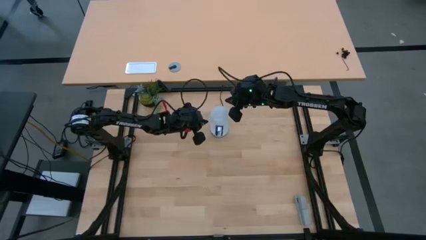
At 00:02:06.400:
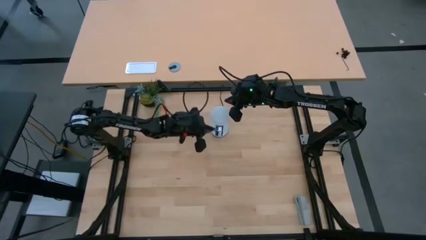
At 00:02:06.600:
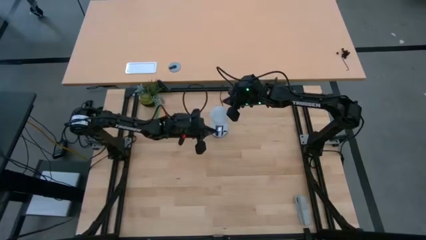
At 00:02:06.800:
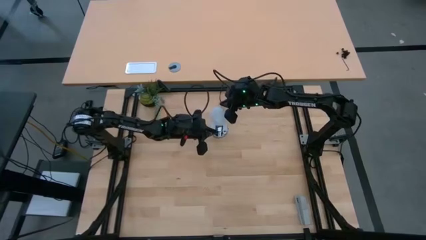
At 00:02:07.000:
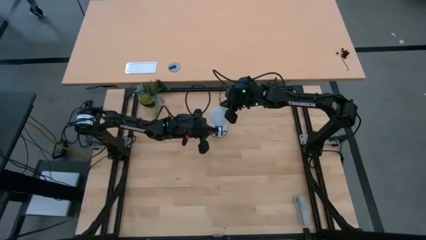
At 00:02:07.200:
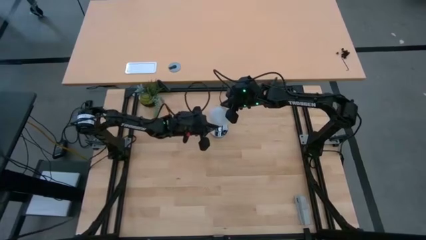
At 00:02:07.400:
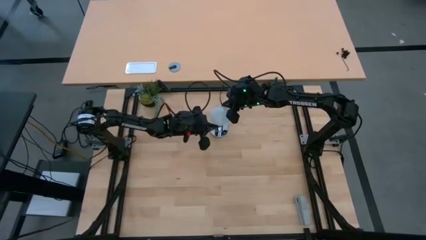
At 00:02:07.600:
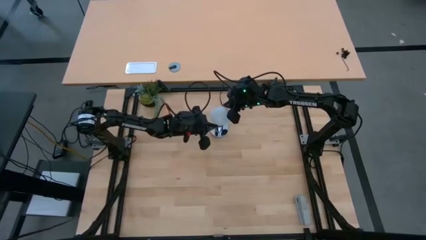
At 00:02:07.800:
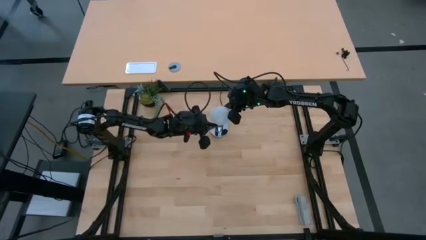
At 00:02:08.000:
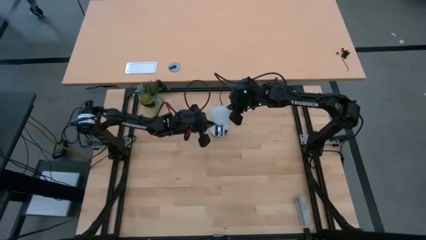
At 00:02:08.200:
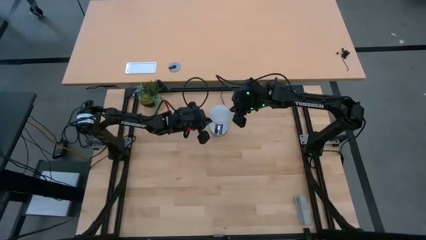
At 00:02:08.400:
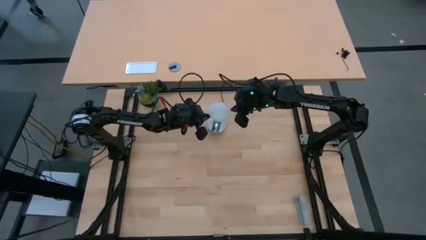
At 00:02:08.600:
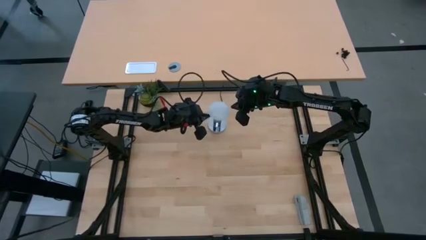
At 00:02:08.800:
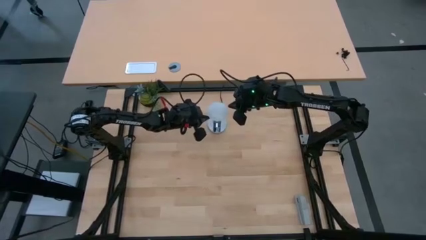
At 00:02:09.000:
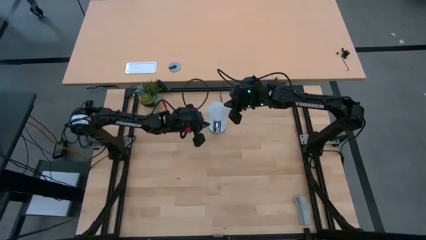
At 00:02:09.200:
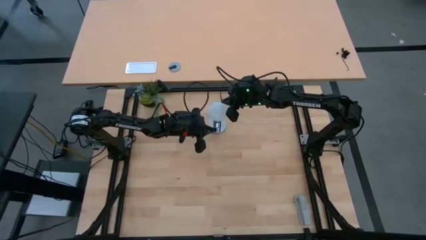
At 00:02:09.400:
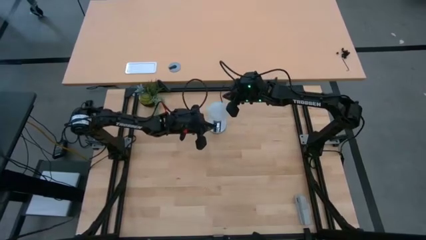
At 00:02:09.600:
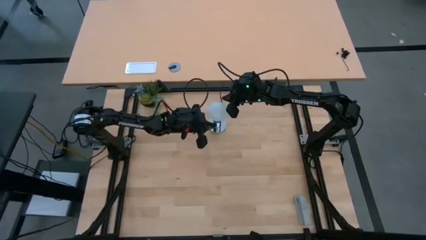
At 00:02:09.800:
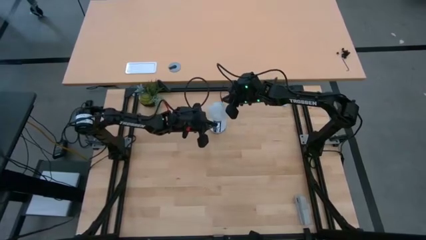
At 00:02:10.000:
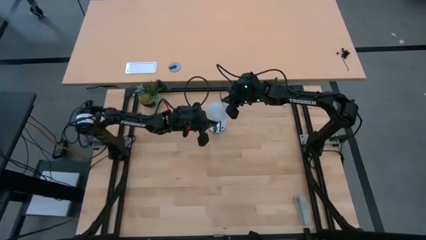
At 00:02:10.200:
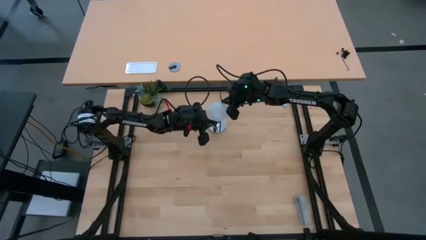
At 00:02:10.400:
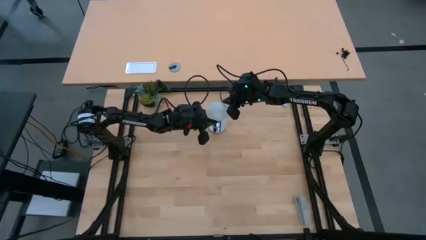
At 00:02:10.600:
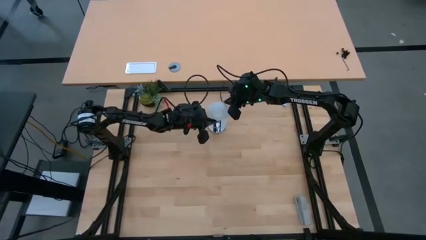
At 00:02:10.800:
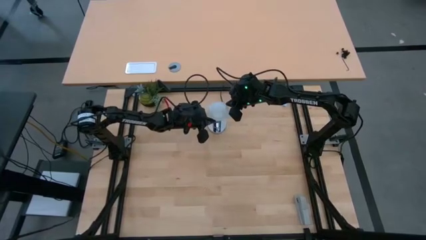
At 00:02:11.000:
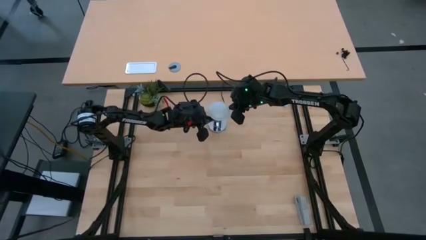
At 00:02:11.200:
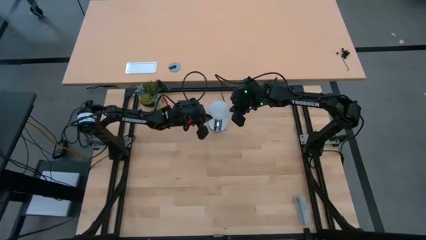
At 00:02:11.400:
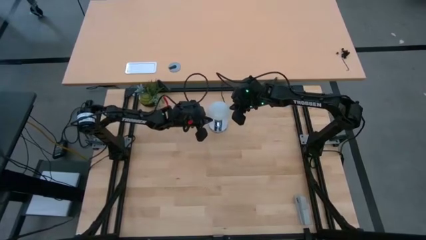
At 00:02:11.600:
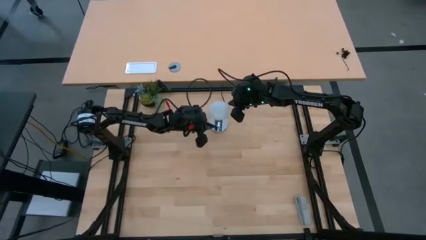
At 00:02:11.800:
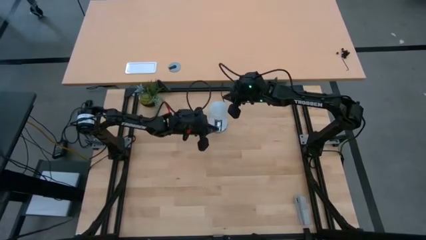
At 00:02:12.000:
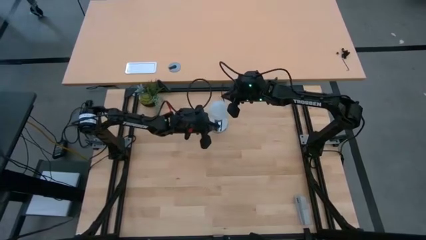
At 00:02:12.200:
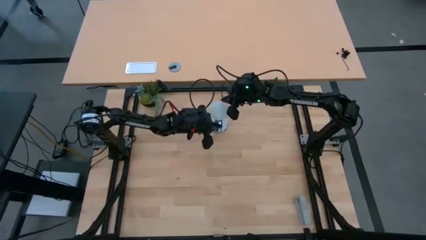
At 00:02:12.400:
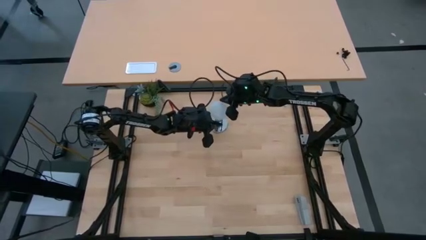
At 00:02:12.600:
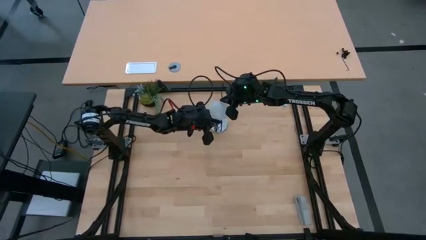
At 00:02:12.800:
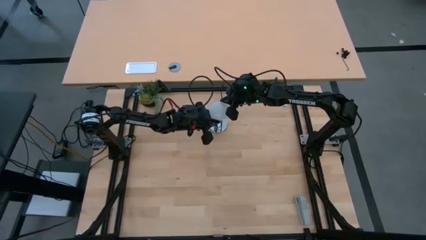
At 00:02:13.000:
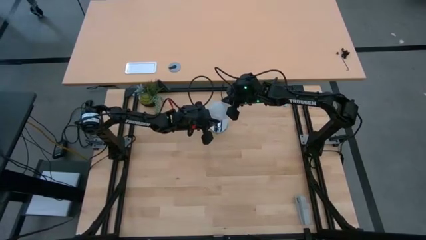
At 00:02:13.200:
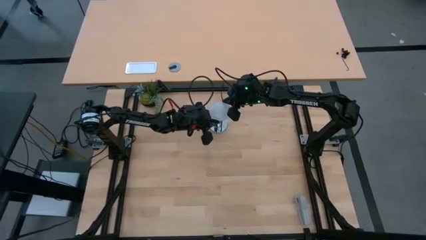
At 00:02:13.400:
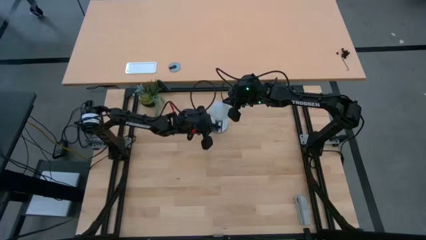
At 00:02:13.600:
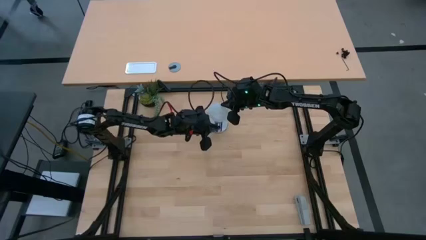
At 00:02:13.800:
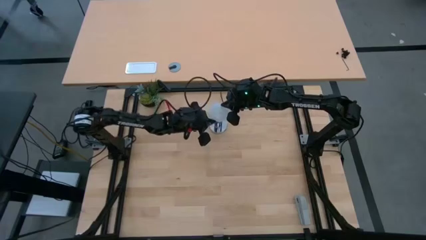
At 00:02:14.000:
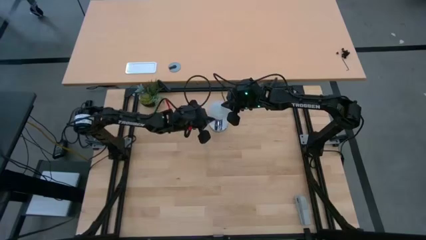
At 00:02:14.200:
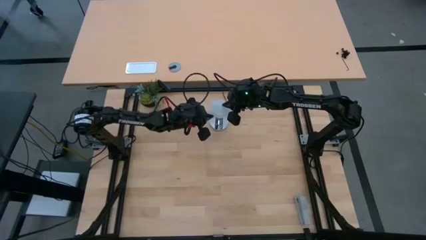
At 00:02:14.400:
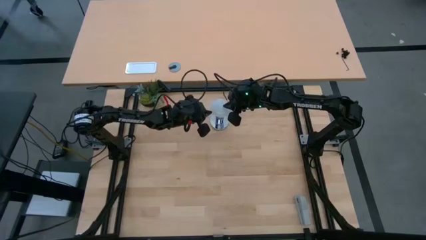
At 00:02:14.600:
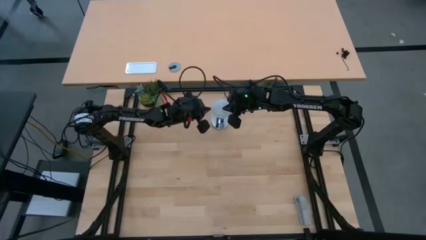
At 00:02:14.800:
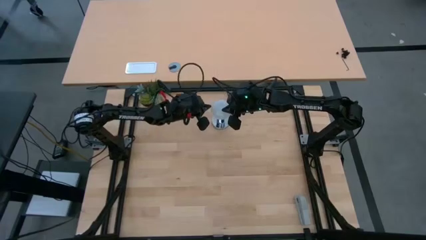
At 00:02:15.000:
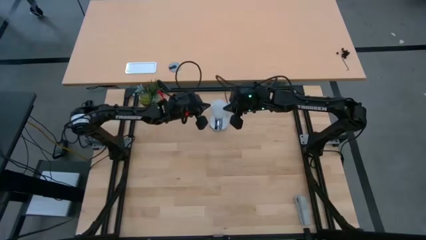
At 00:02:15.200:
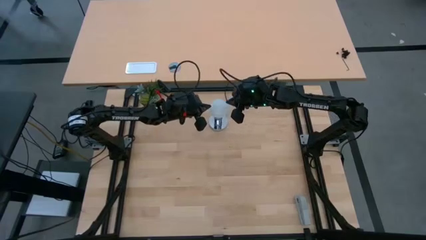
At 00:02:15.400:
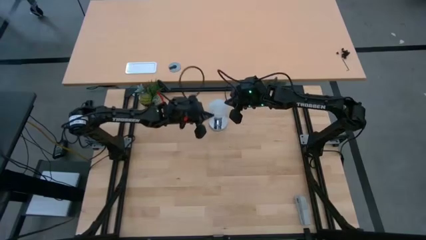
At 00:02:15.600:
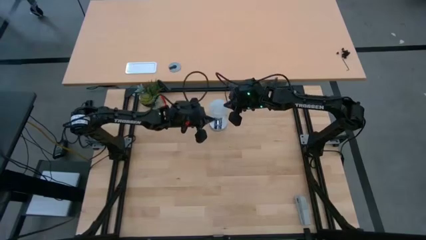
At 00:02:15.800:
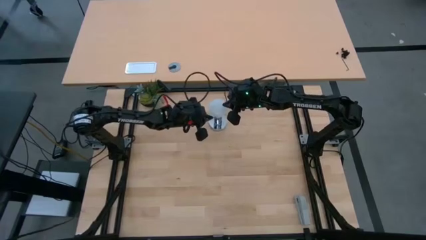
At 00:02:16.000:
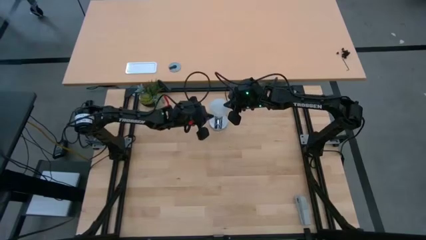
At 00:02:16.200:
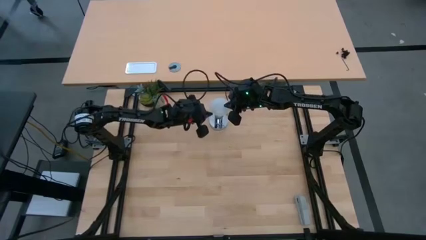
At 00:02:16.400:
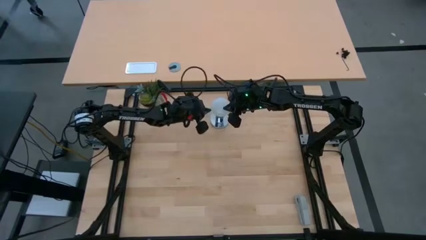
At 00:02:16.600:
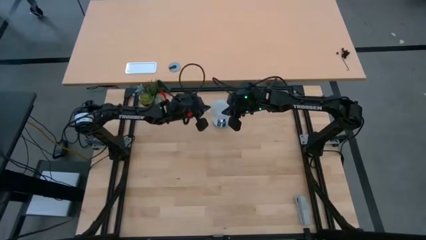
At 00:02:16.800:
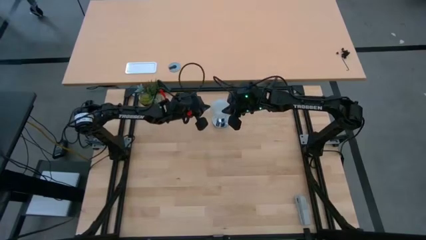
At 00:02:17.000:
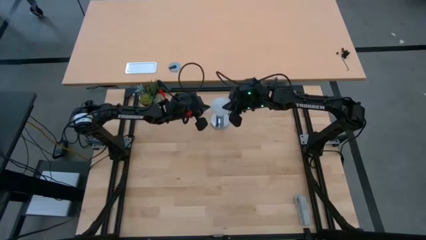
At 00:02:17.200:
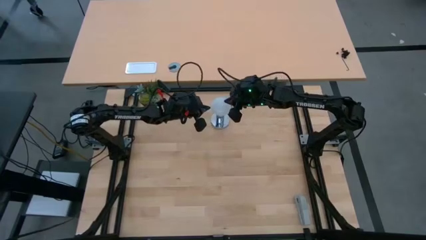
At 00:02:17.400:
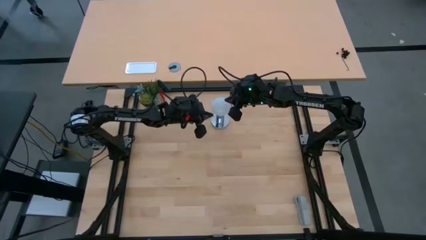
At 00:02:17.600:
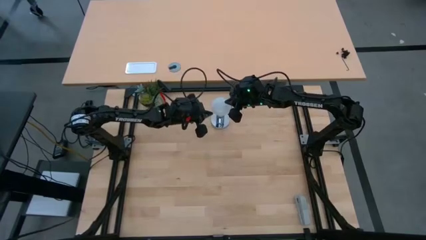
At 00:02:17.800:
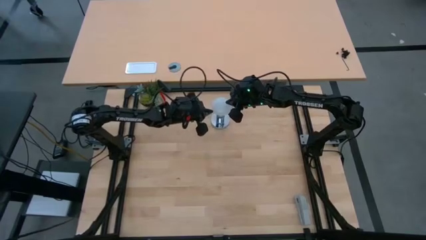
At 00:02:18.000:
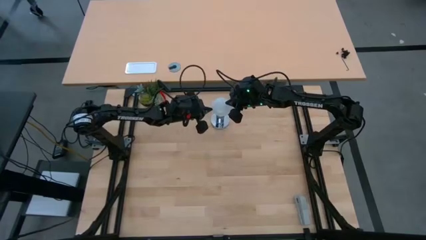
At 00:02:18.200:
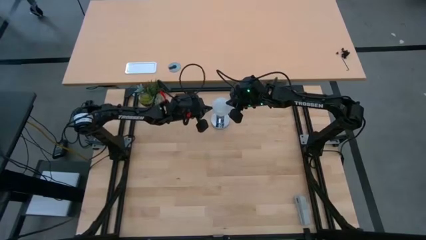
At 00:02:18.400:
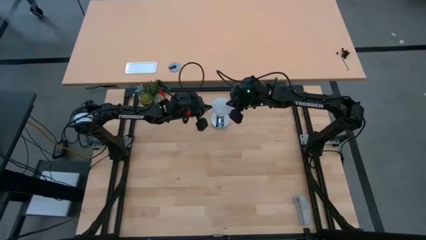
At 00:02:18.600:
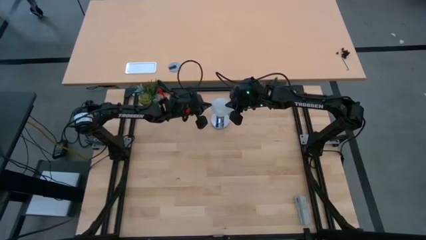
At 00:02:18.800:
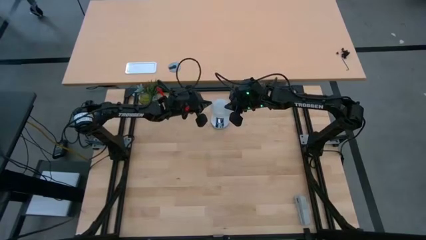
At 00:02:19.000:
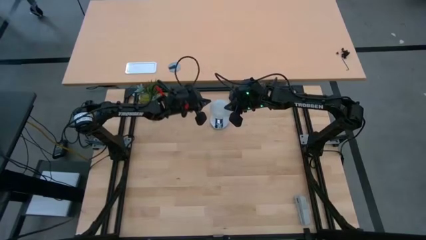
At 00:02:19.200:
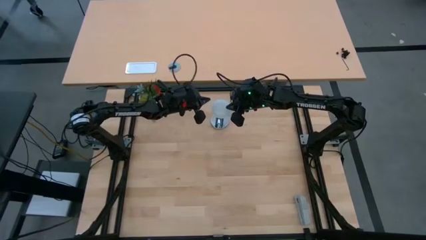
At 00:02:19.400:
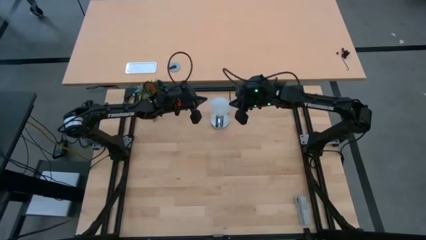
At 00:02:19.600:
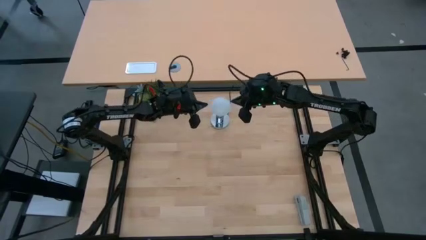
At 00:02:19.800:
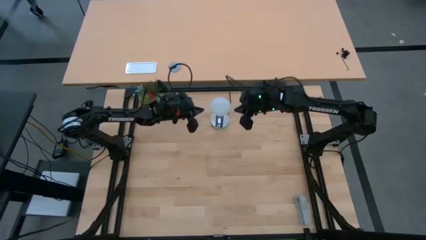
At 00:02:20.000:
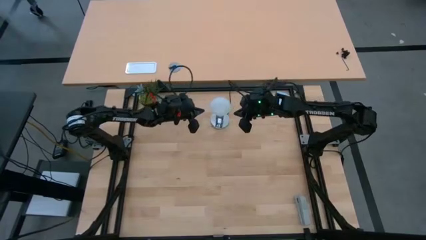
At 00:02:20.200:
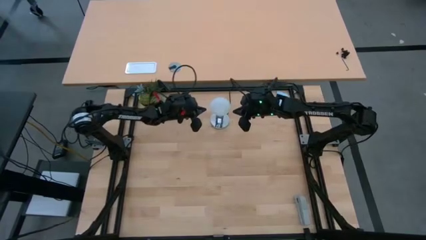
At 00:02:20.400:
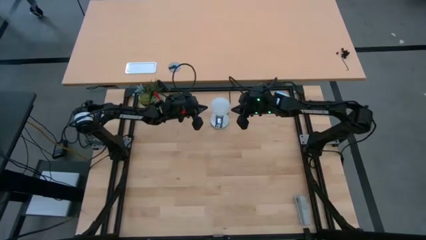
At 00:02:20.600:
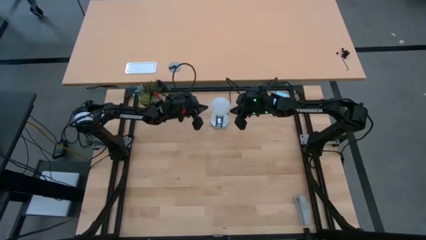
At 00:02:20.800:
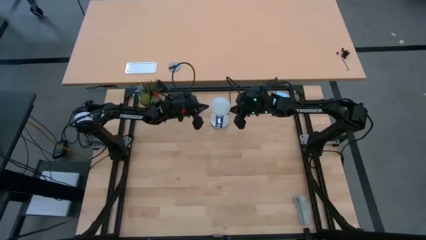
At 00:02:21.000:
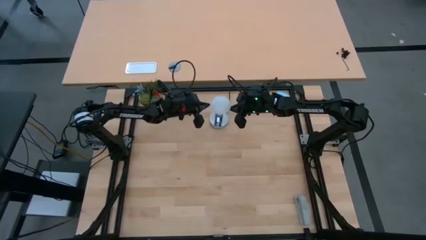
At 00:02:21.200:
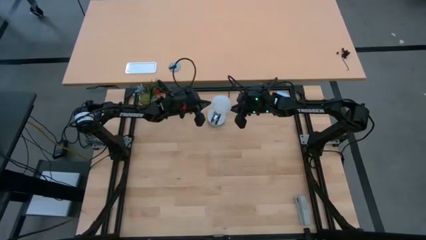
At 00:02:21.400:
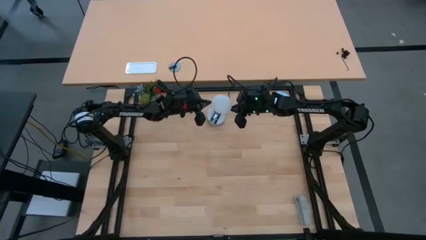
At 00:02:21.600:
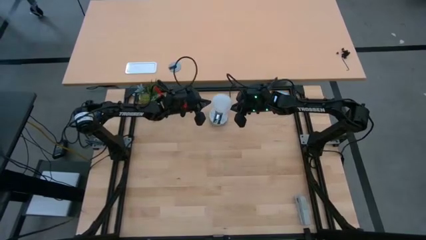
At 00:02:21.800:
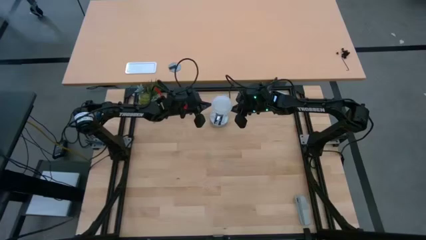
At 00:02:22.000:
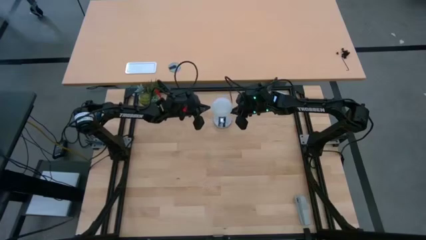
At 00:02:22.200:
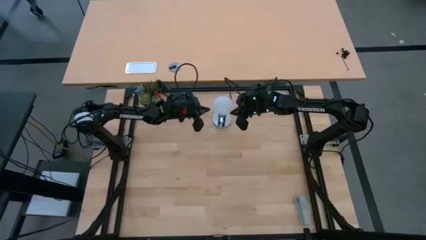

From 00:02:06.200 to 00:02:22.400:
Task: Screw lightbulb
Insert the white lightbulb into the desk lamp
